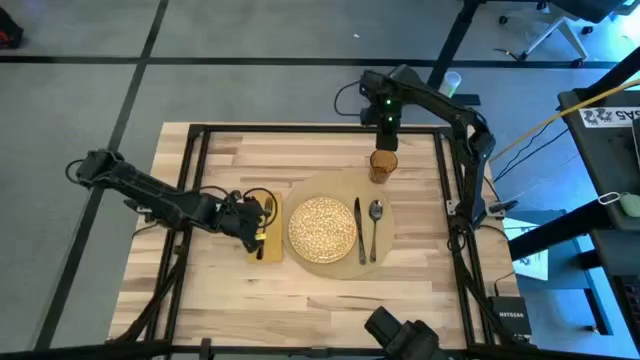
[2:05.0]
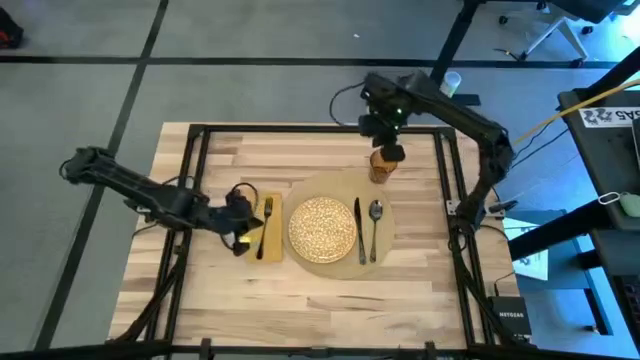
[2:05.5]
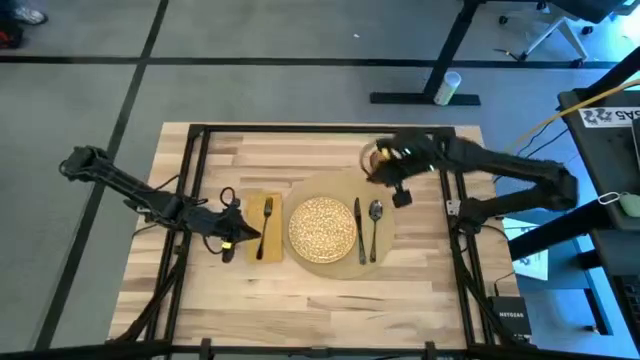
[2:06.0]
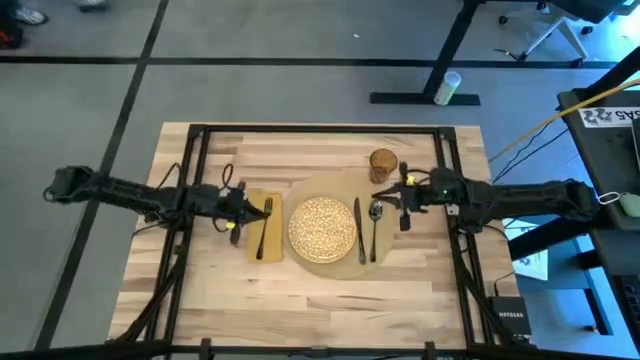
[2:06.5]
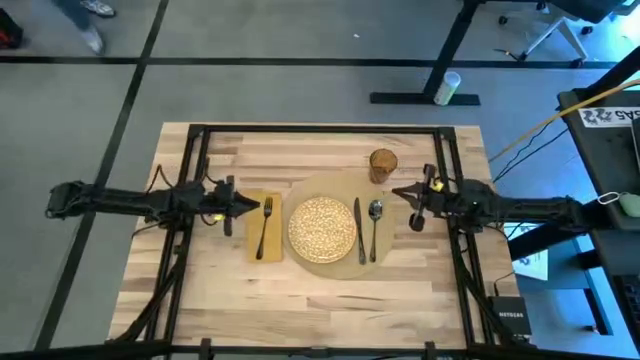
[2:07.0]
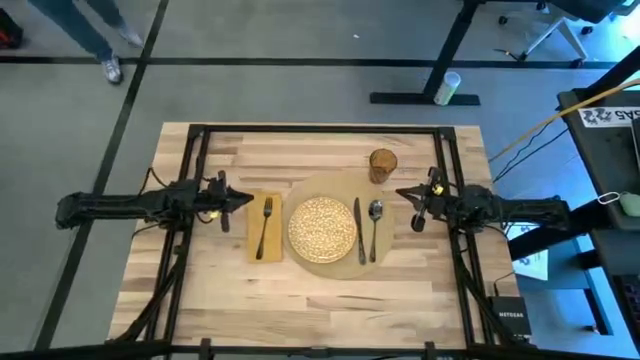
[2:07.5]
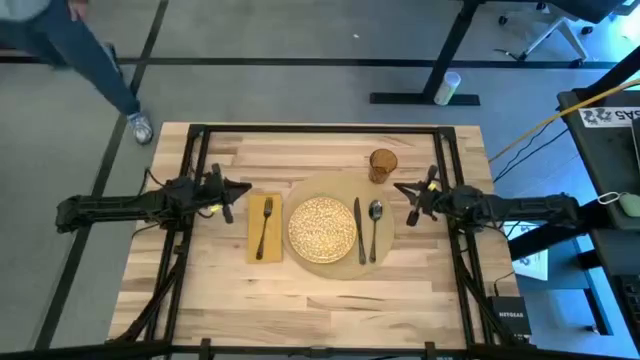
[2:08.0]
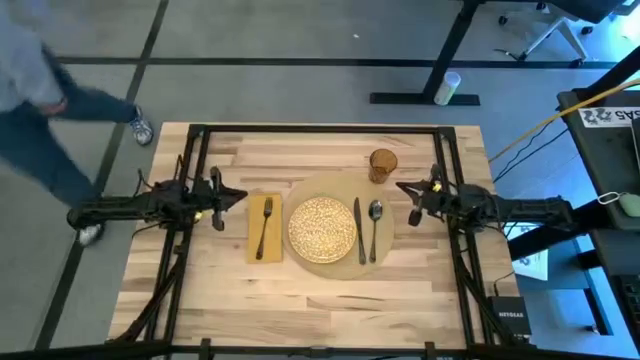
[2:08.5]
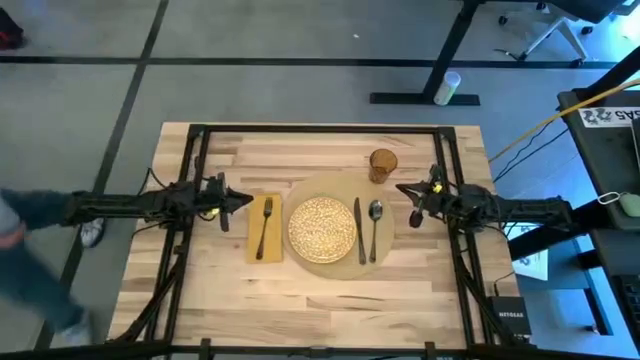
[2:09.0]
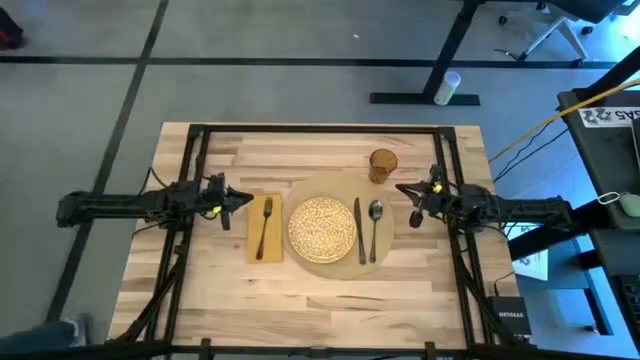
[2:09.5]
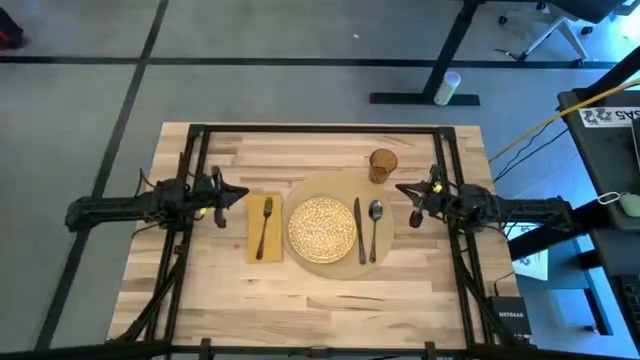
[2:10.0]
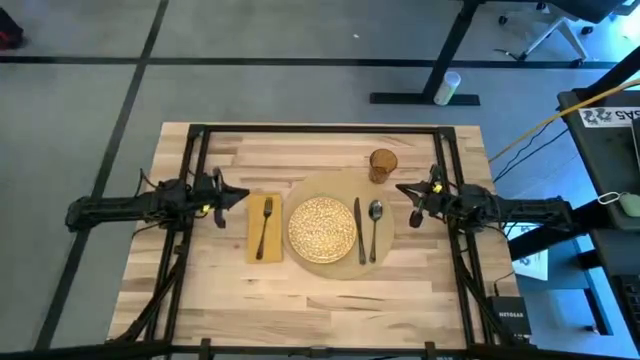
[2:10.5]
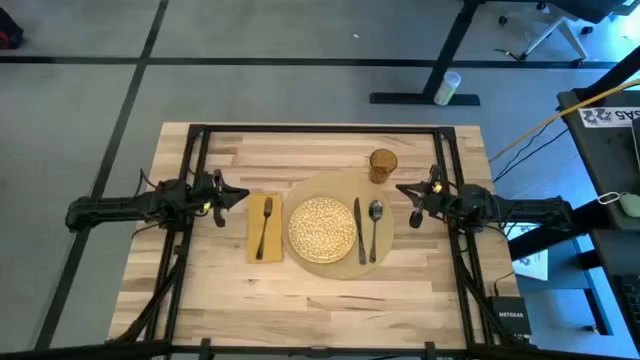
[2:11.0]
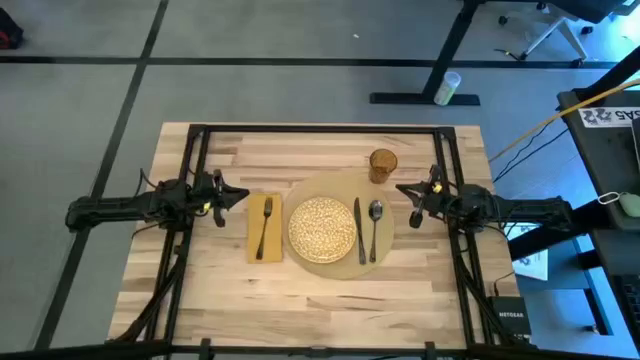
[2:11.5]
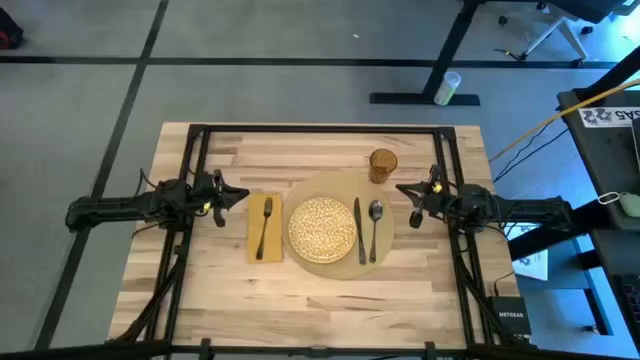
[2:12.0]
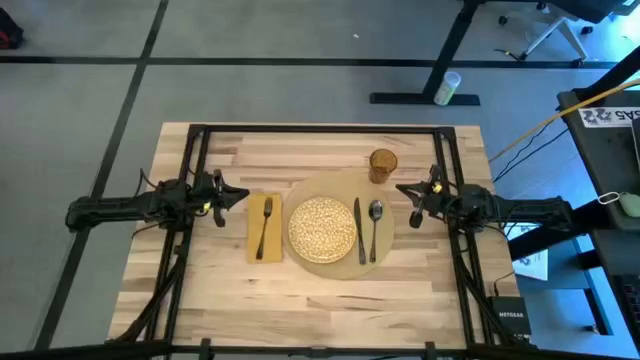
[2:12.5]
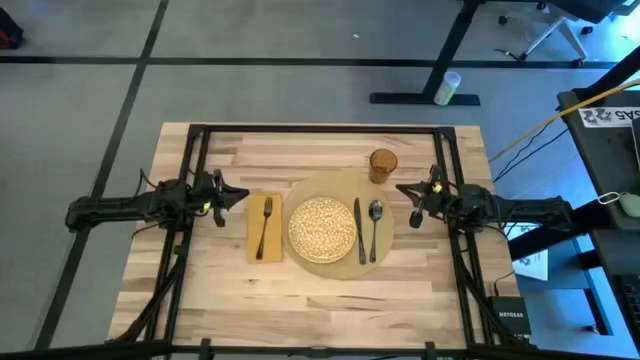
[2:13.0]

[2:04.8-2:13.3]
Task: Set table place
Return to Home Position

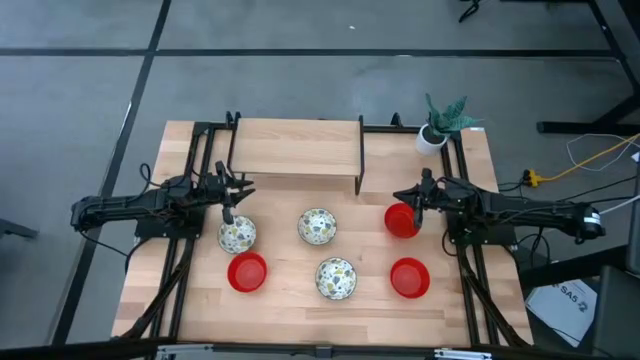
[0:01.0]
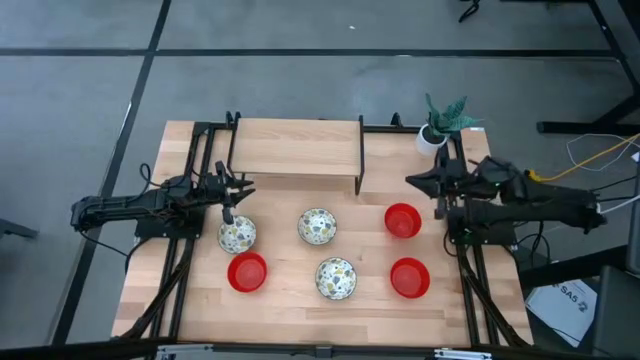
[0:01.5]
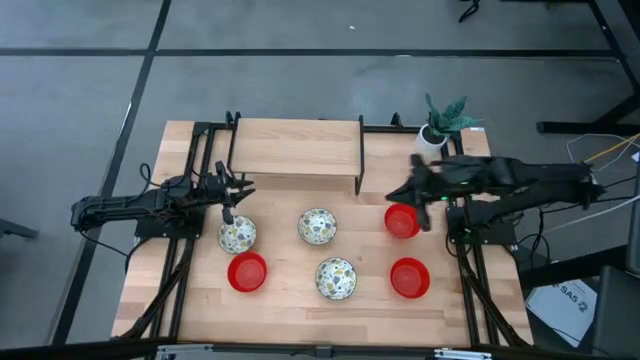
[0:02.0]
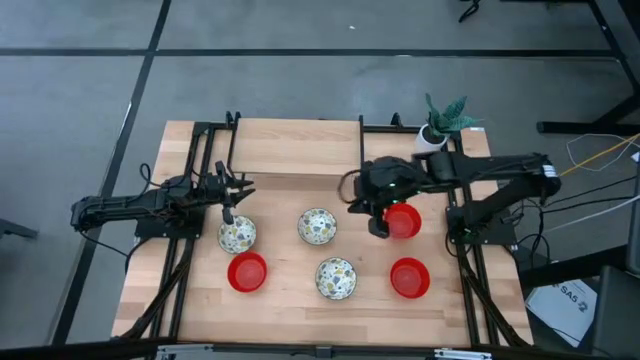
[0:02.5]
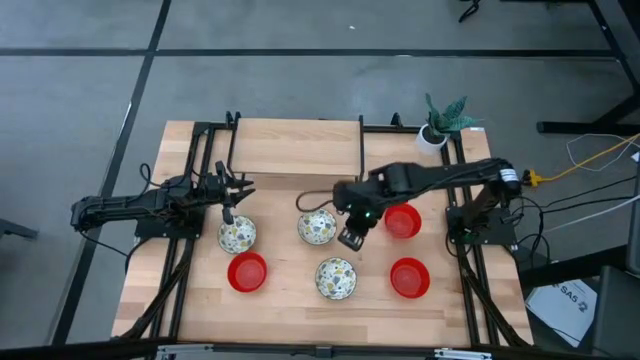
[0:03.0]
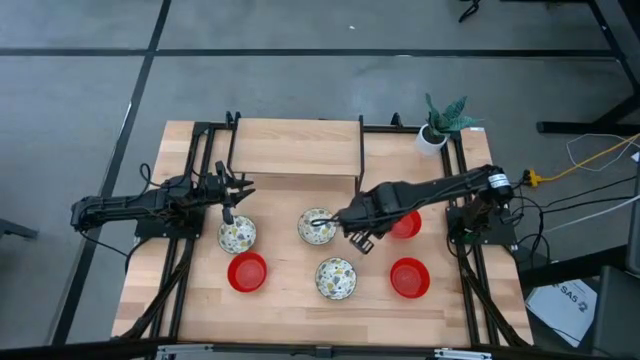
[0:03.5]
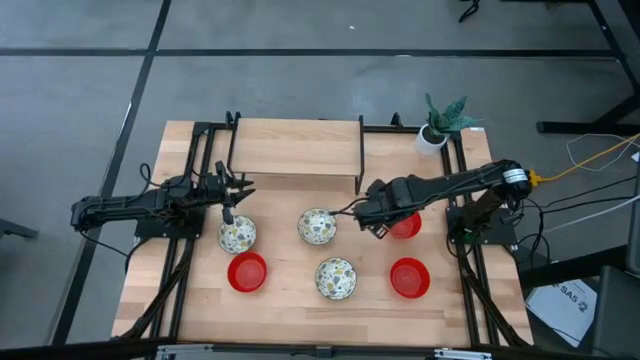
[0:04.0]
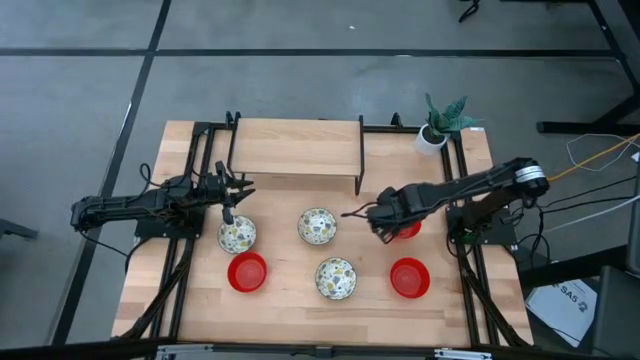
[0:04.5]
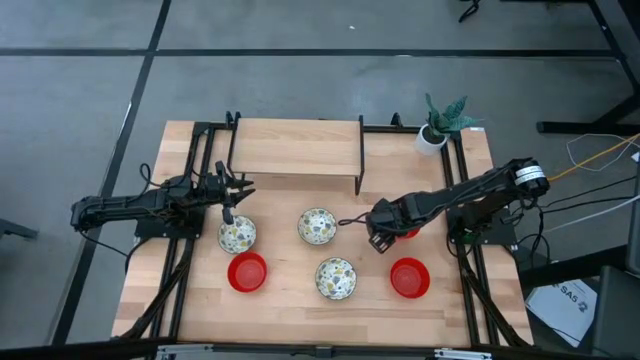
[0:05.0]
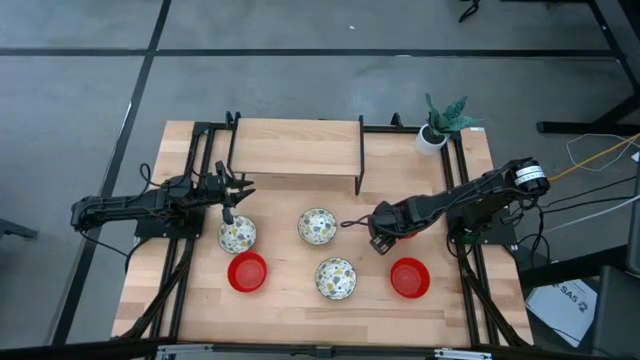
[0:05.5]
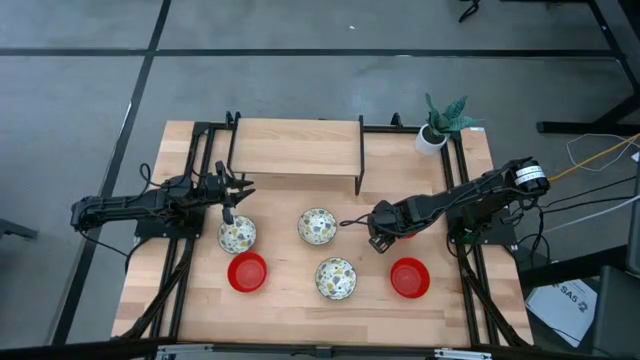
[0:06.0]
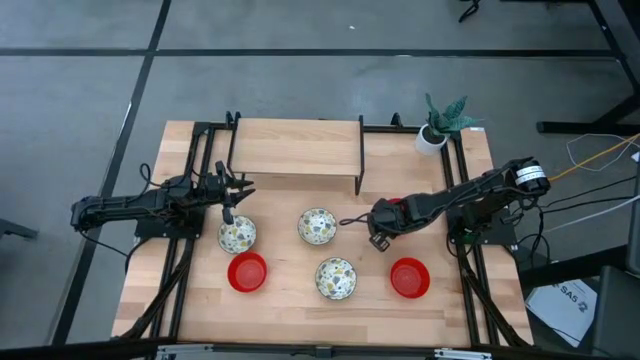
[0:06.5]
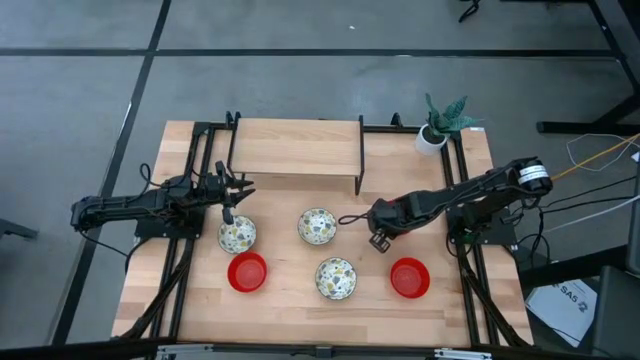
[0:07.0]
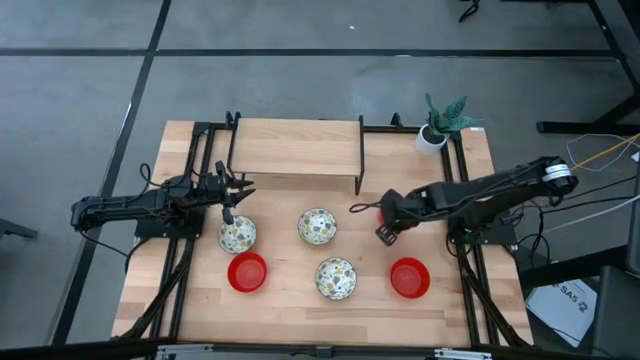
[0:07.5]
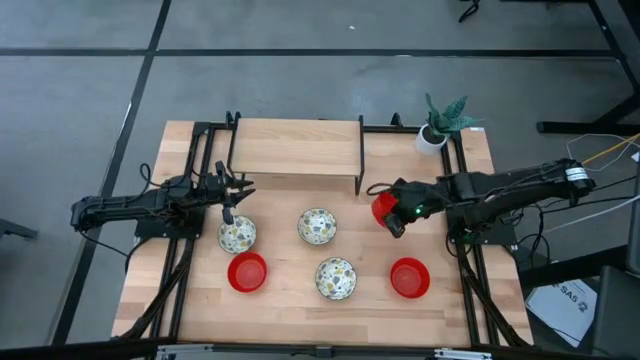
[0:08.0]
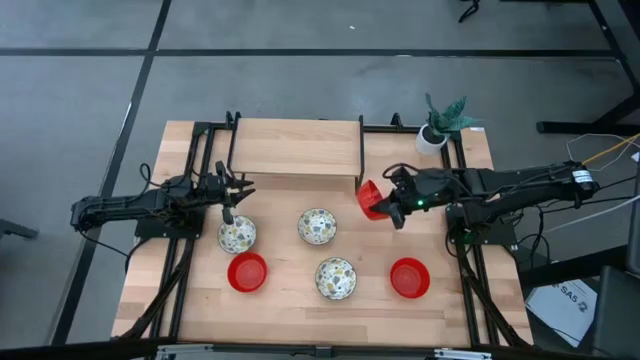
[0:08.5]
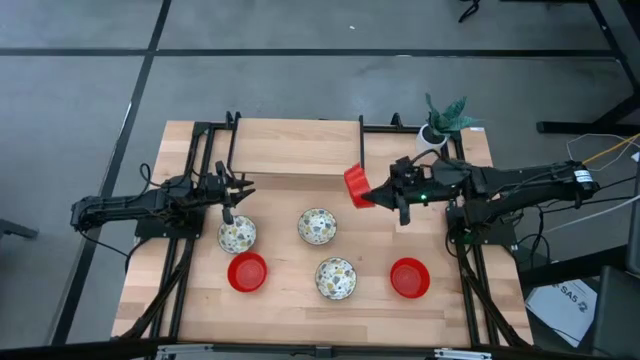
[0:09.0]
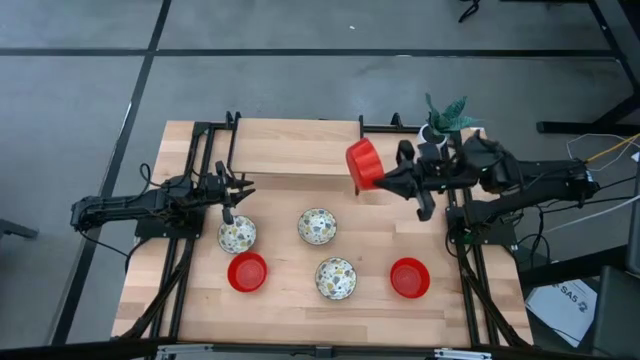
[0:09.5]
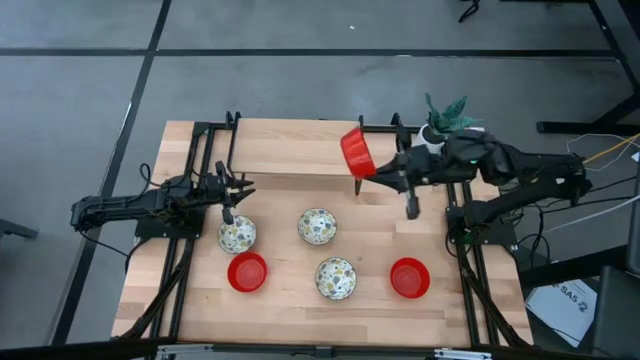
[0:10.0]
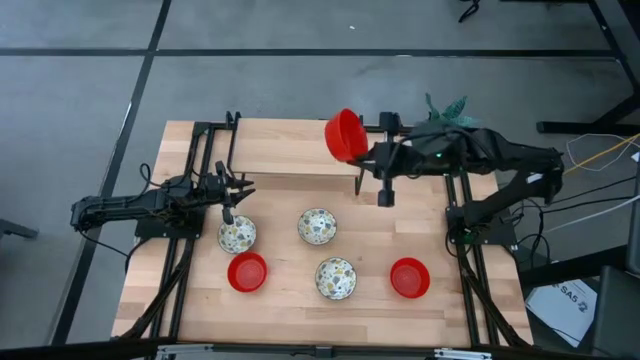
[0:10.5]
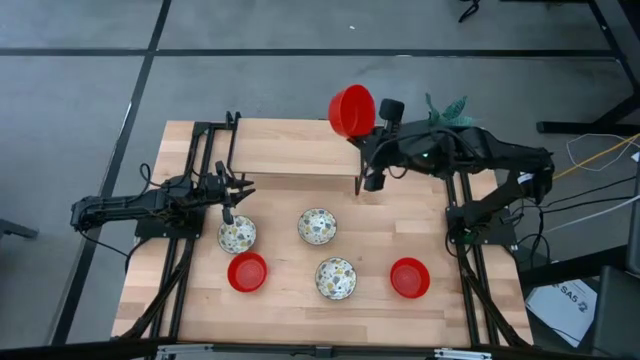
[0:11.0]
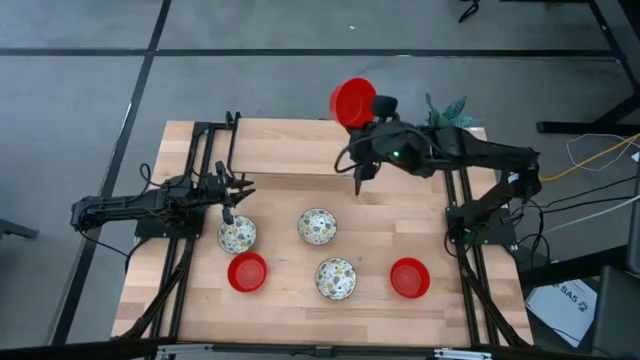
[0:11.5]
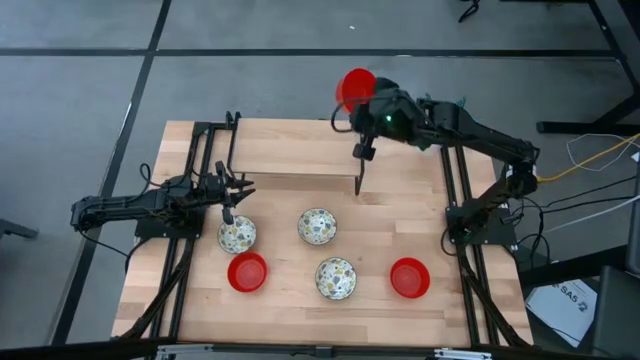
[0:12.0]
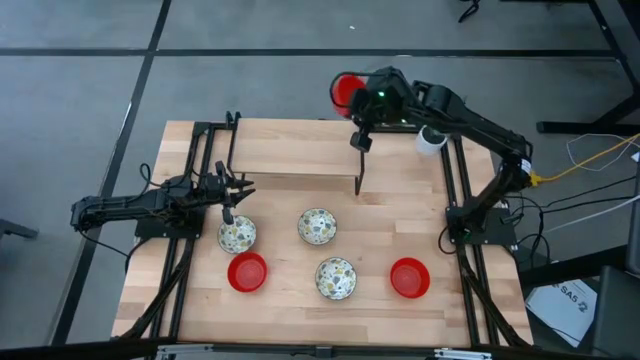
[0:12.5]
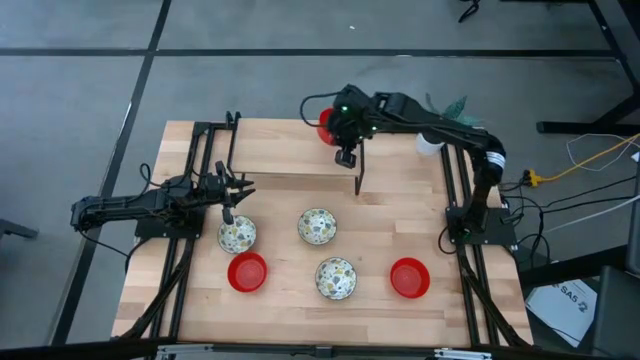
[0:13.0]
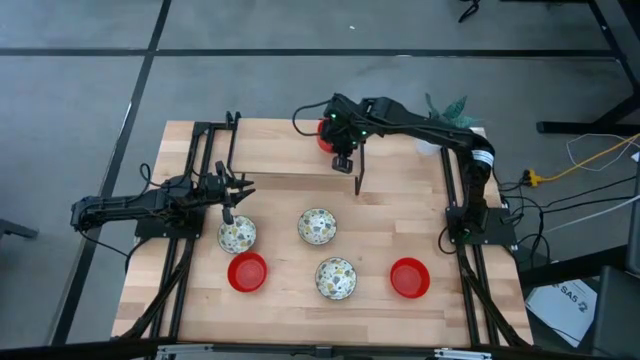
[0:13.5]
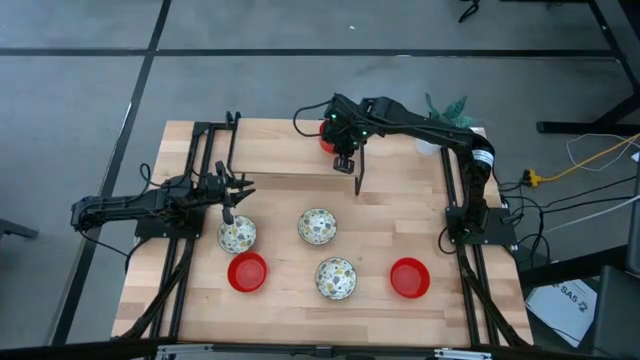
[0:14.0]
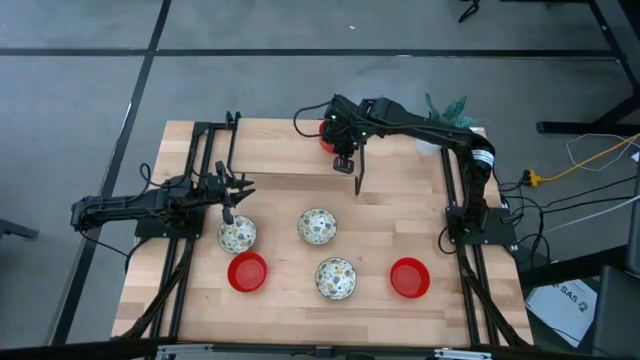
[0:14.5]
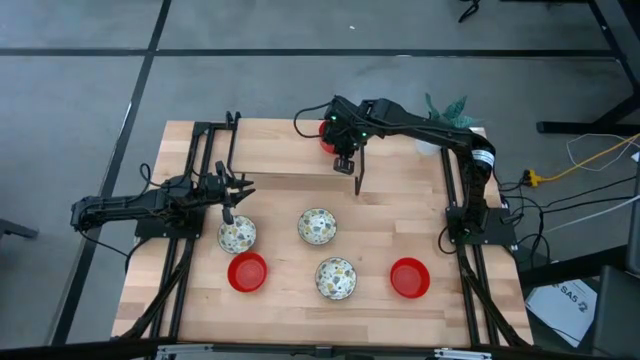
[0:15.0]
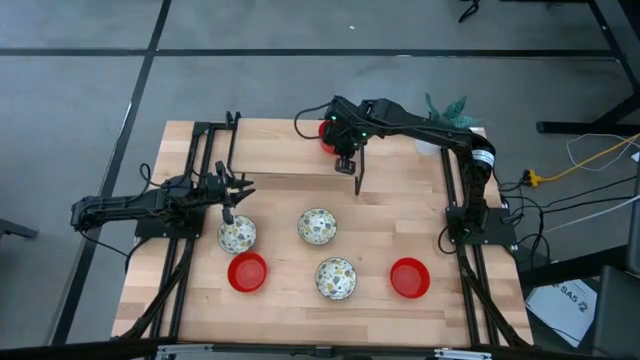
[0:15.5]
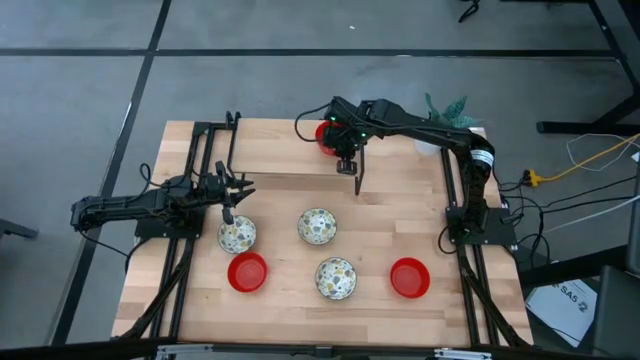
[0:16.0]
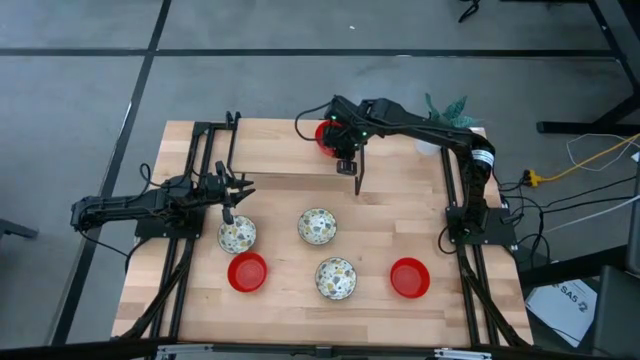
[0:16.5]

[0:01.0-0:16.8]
Task: Pick & Place Mini bowls
Put the top red bowl on the shelf
